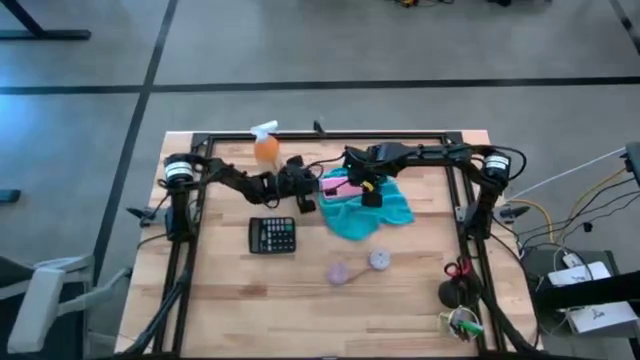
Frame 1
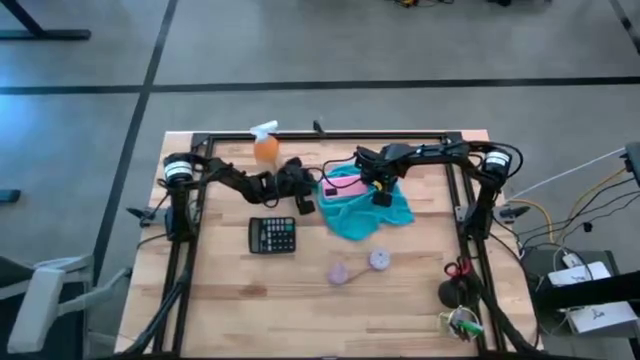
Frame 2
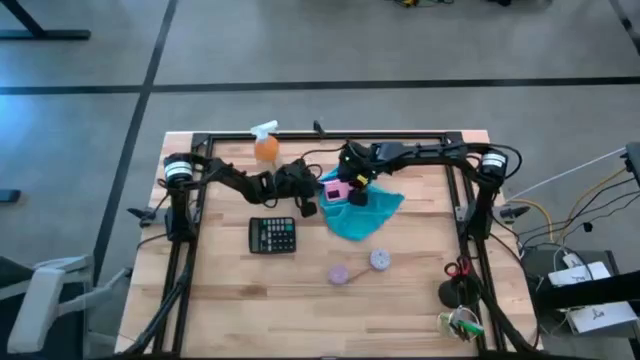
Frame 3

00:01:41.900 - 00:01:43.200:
Task: Apply microfiber cloth
Wipe the pink cellphone using the blue microfiber cloth

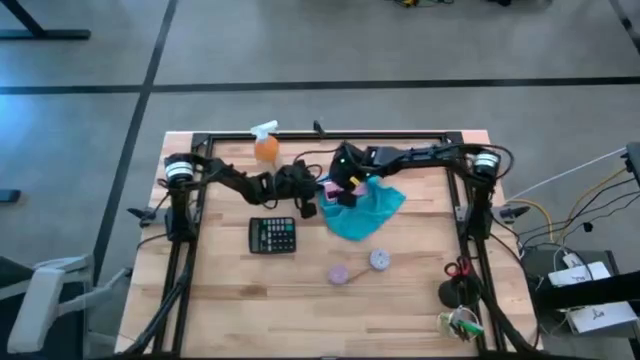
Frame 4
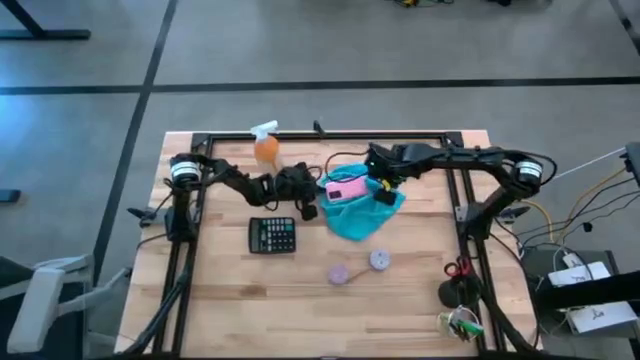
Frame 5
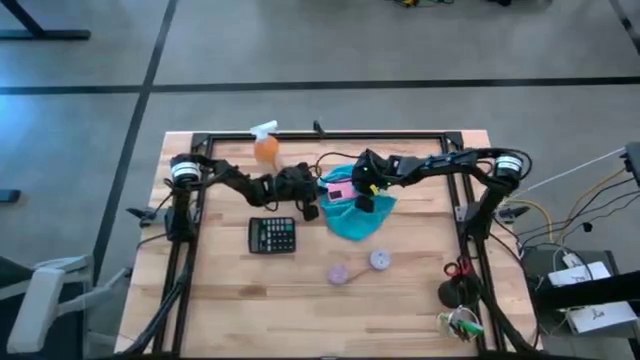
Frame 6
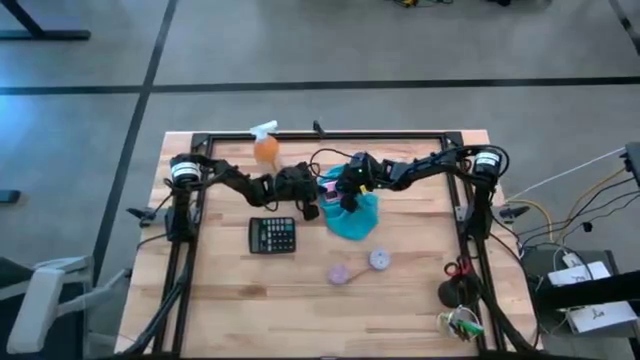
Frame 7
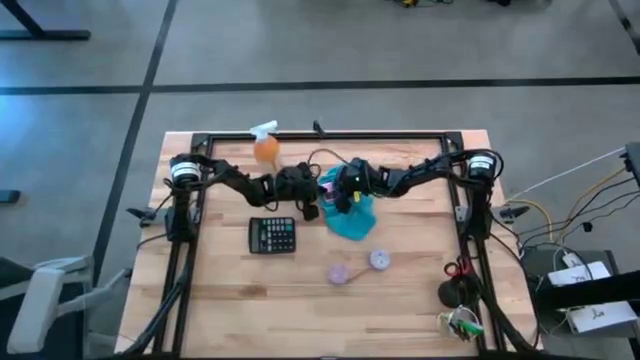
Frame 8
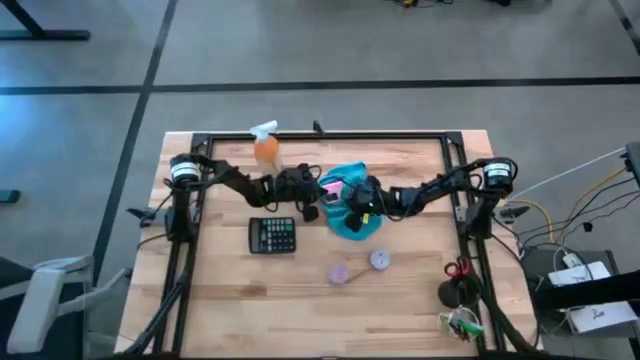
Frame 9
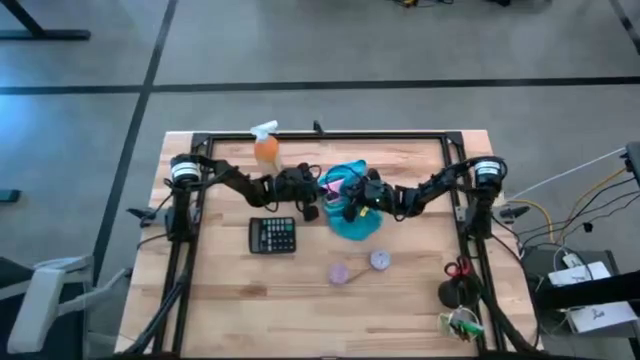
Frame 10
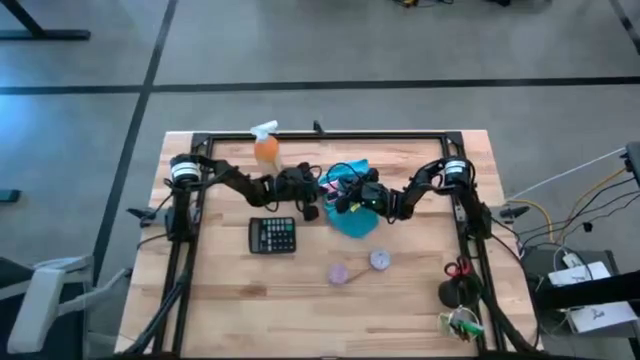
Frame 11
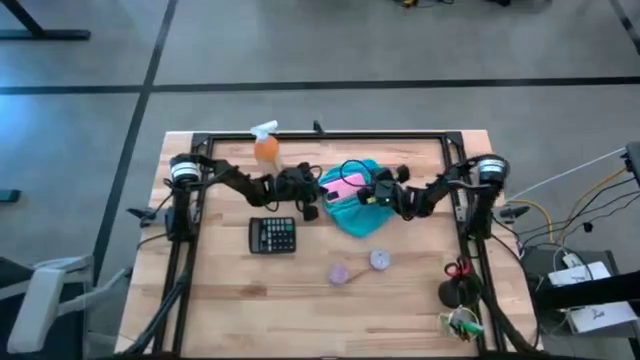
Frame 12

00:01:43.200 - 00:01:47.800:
Wipe the pink cellphone using the blue microfiber cloth

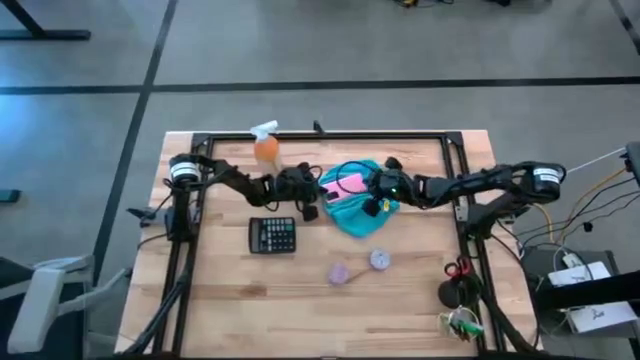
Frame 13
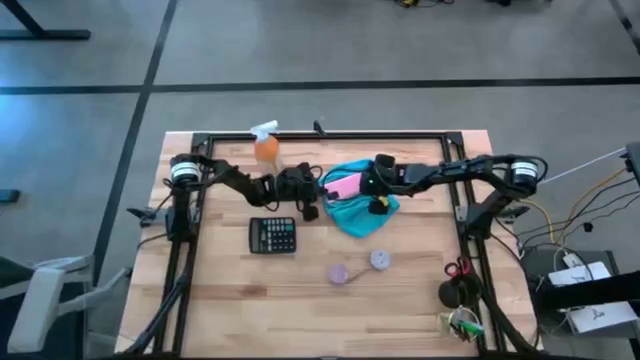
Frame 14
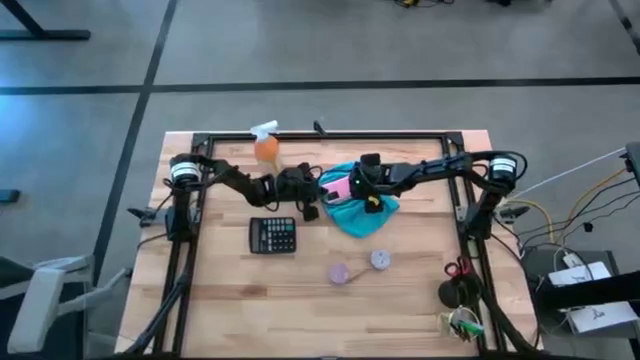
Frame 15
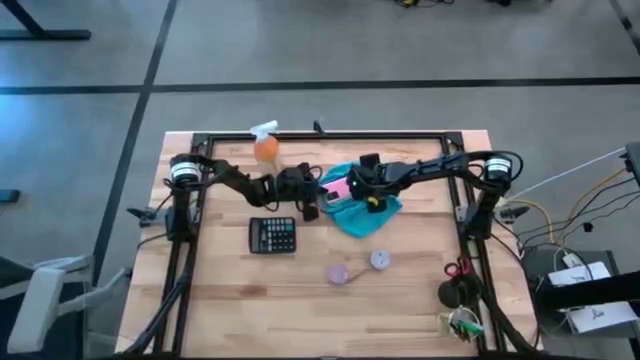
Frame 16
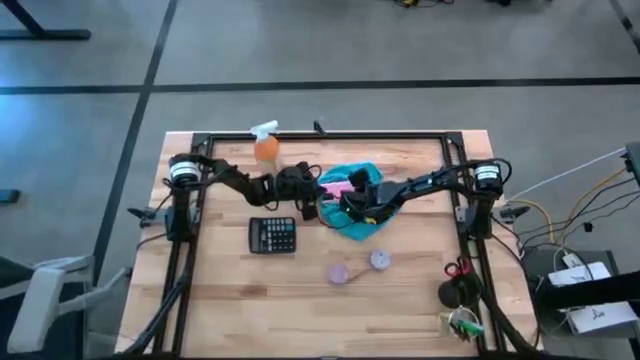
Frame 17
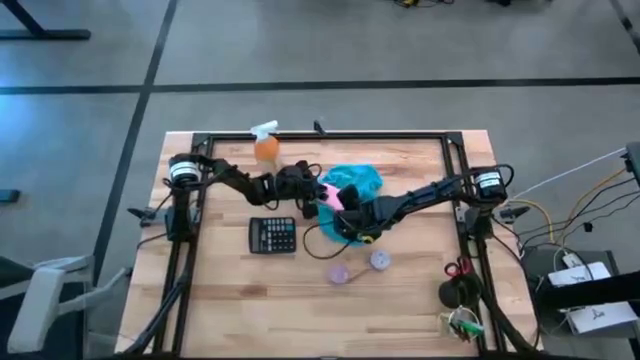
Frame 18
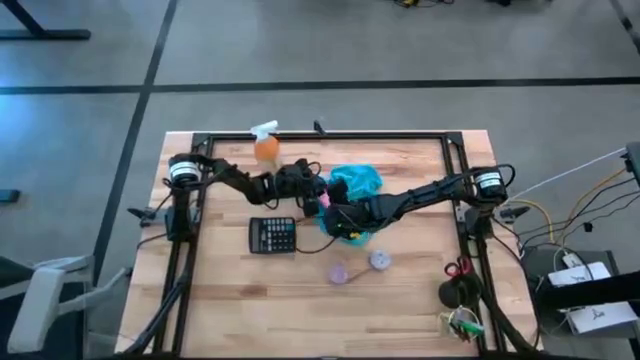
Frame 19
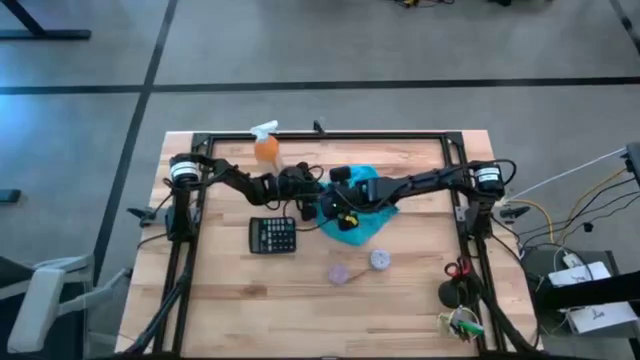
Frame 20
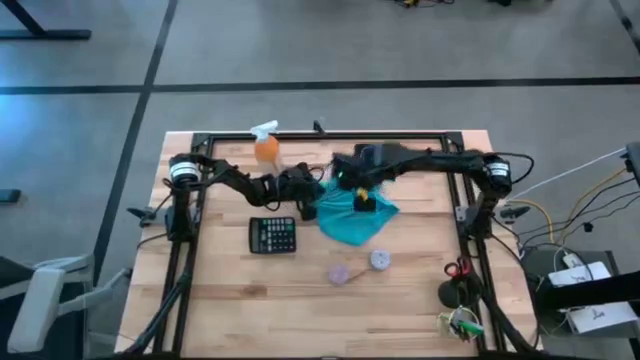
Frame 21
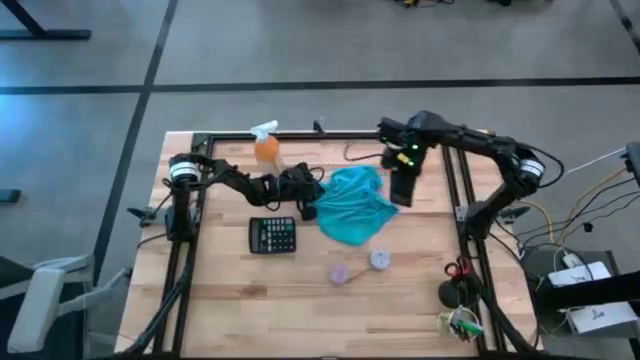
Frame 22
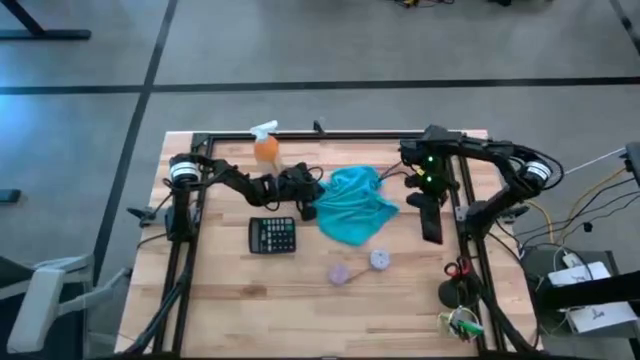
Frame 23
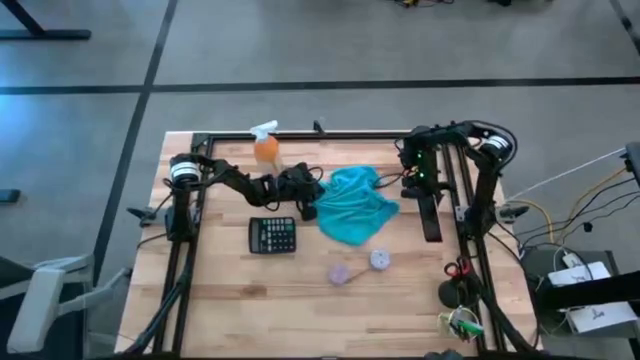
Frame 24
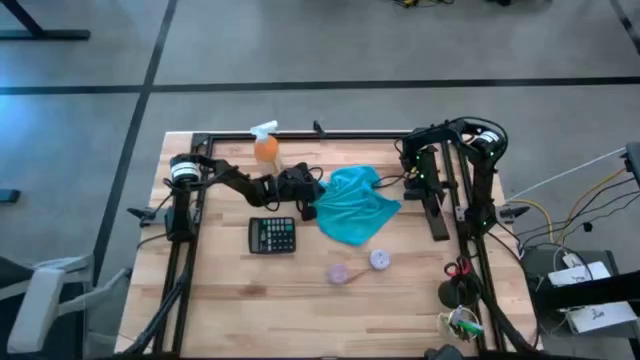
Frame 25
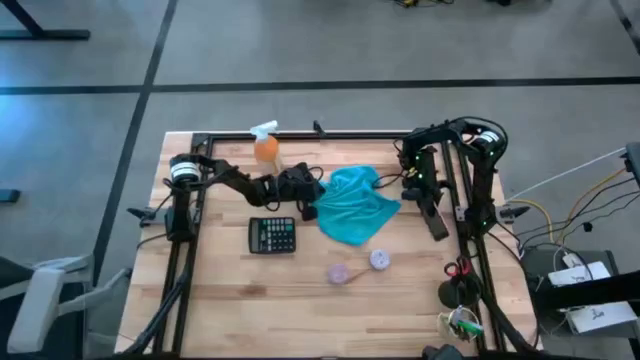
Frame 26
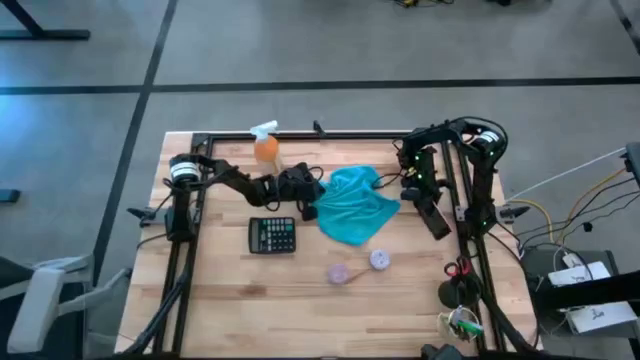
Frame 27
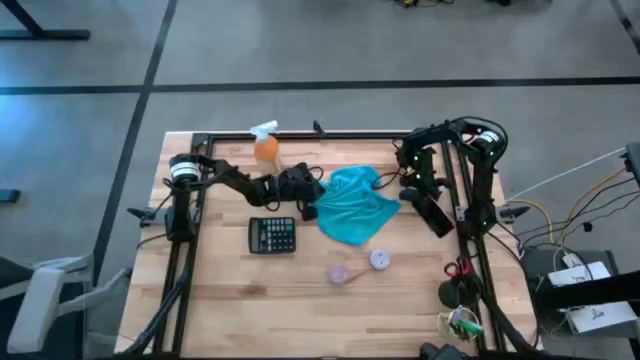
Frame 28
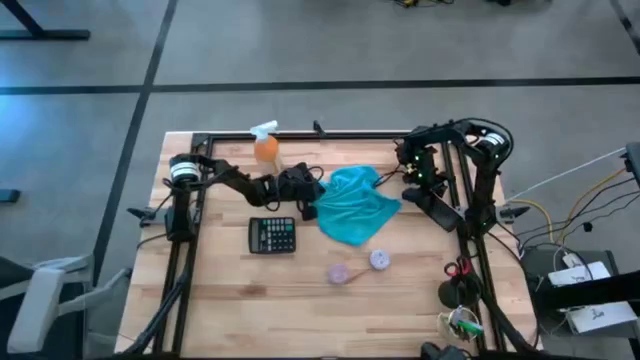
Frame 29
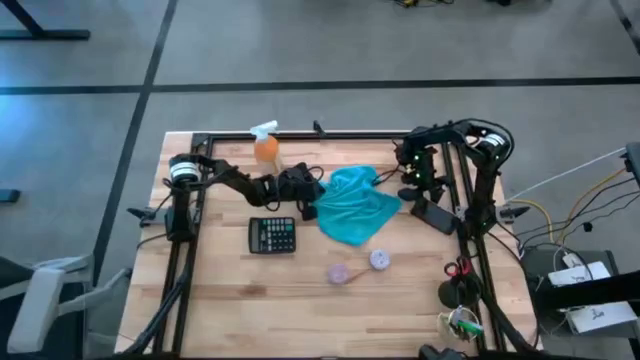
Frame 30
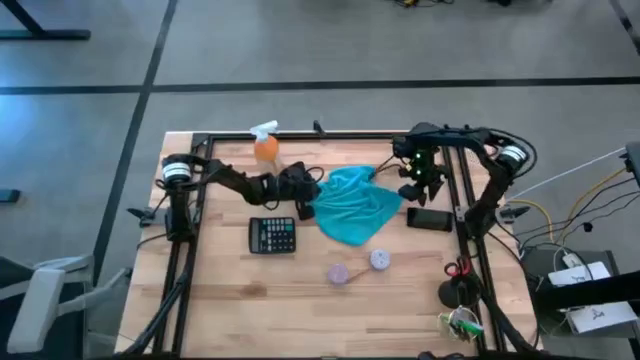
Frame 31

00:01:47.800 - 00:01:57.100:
Move the pink cellphone to the middle right of the table

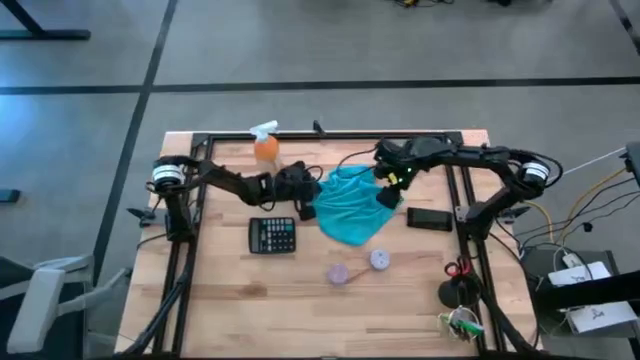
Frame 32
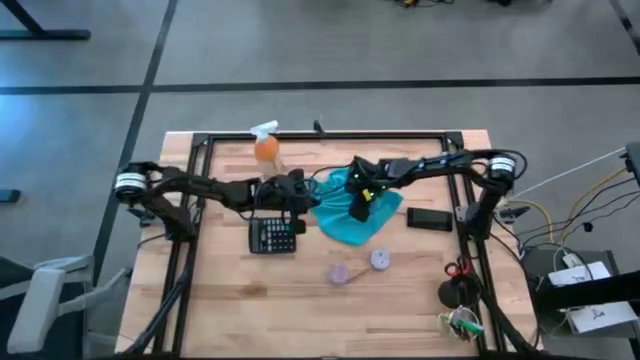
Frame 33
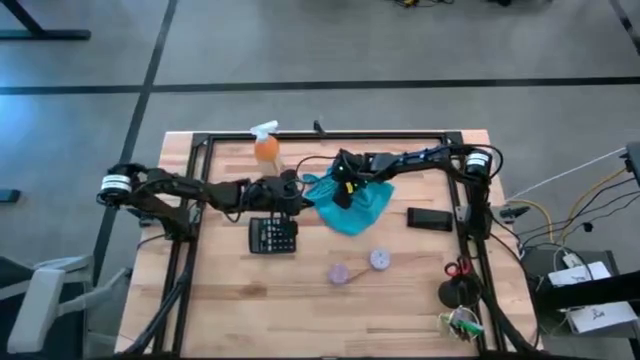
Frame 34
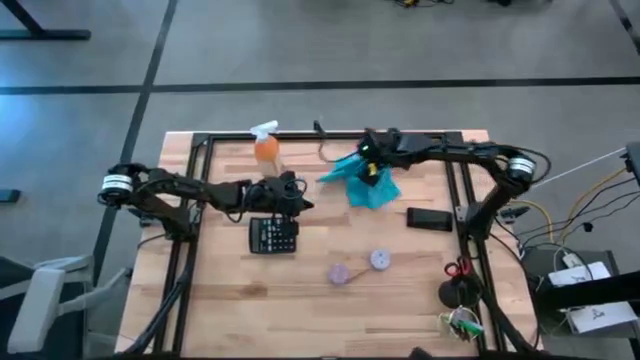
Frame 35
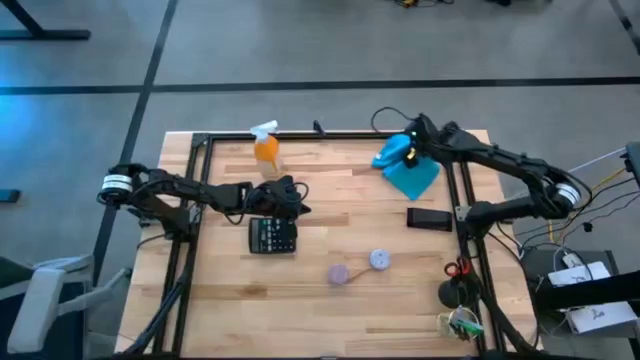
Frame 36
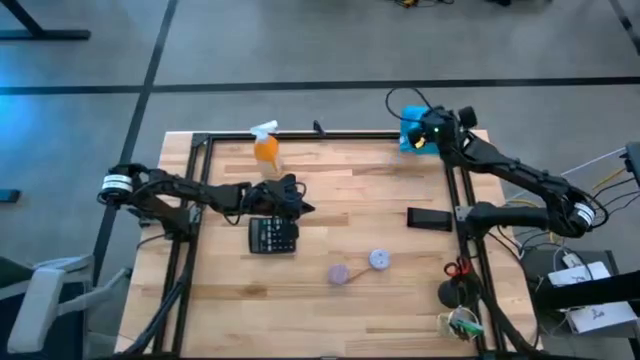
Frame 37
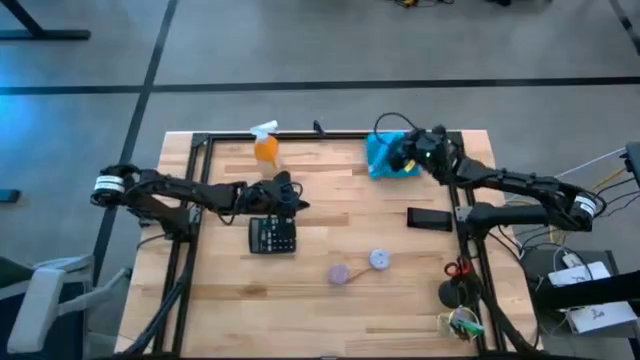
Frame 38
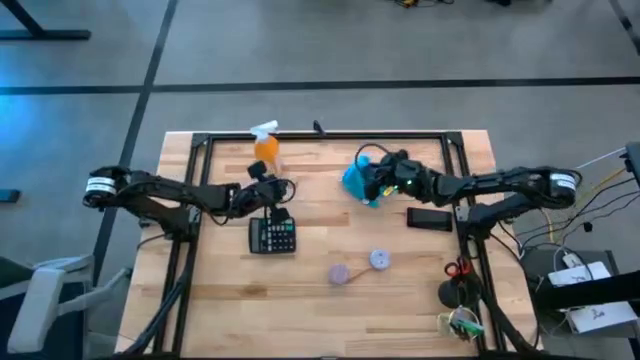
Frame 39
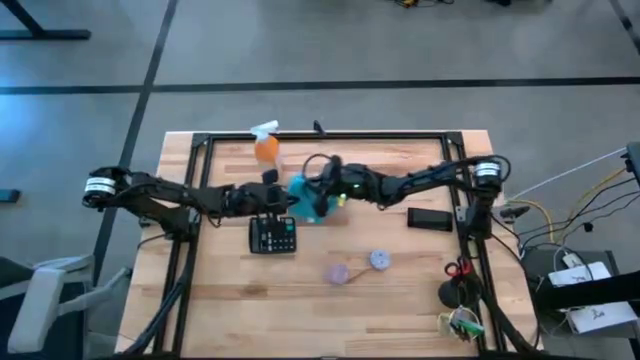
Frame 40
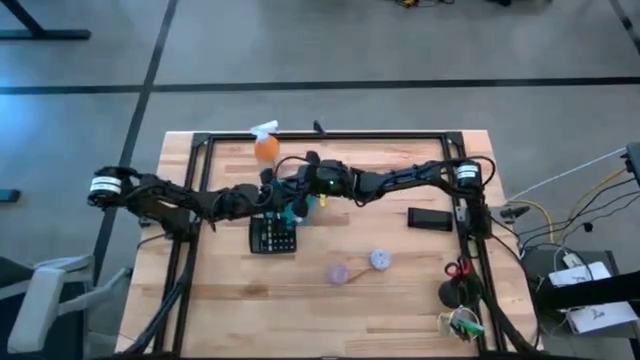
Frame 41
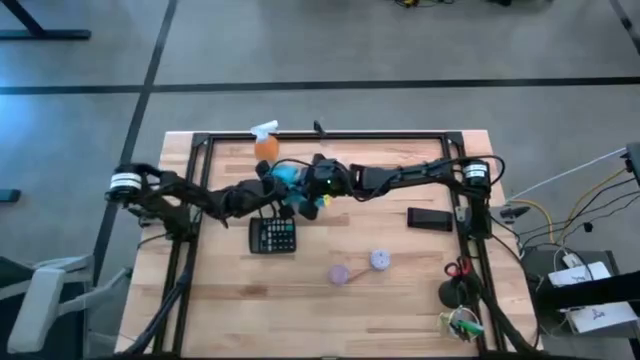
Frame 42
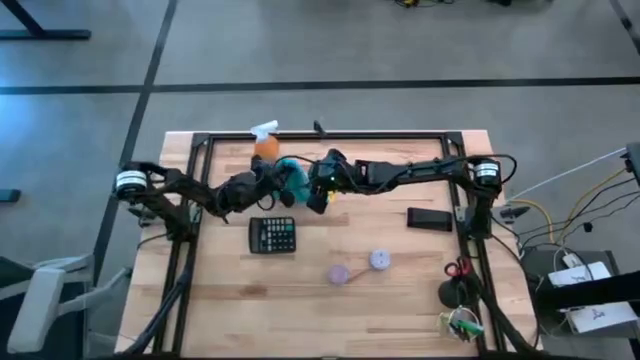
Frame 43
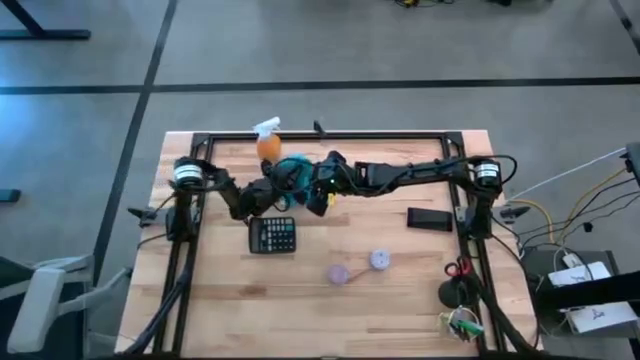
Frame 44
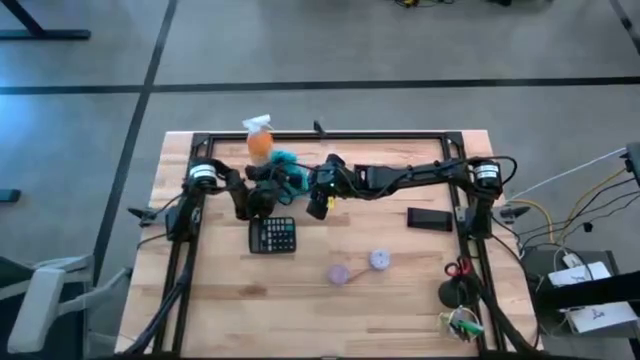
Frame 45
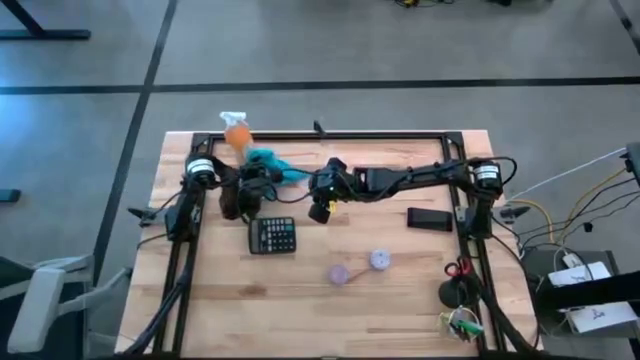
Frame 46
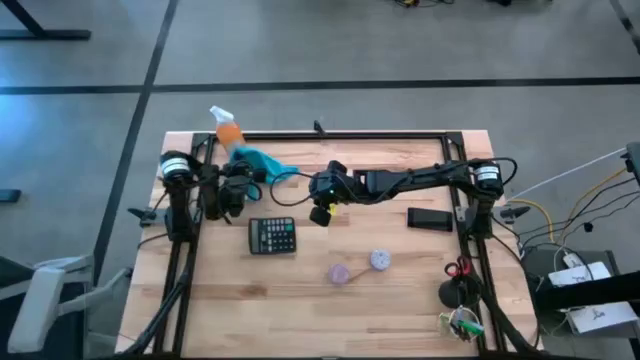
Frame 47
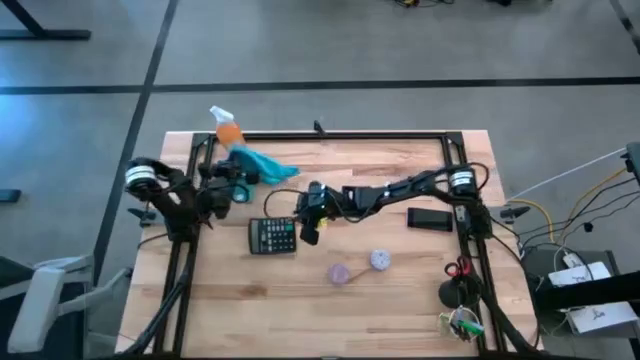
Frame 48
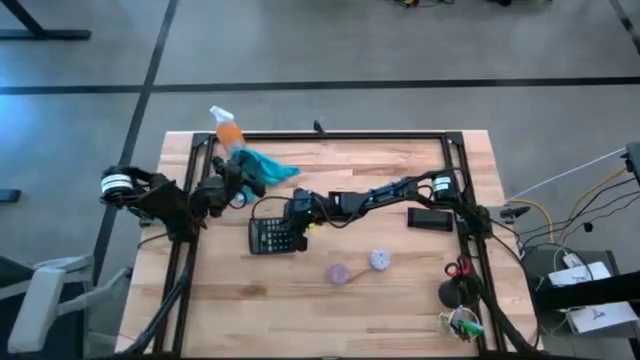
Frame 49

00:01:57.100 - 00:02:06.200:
Move the blue microfiber cloth to the top left of the table
